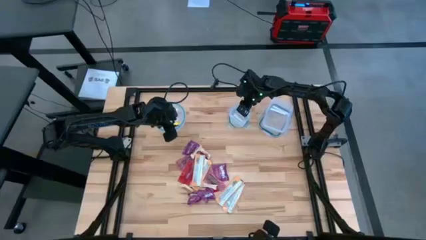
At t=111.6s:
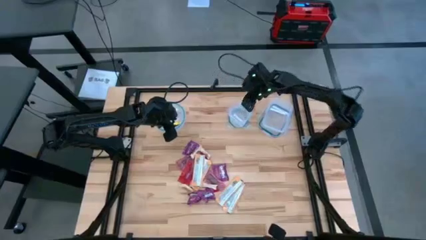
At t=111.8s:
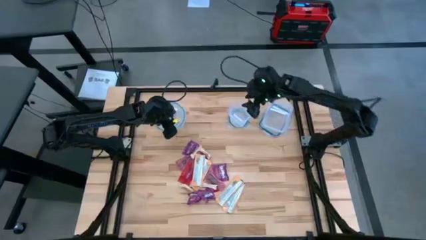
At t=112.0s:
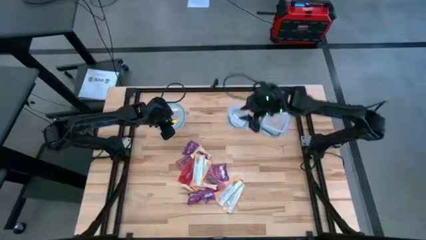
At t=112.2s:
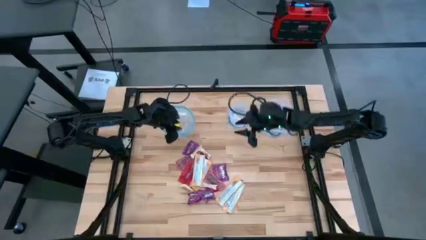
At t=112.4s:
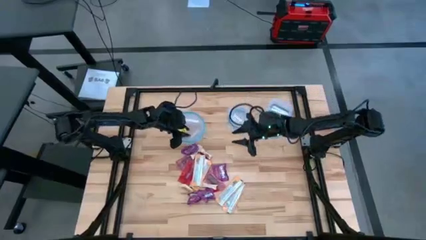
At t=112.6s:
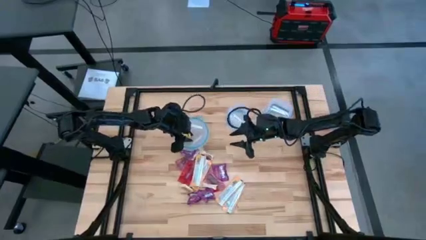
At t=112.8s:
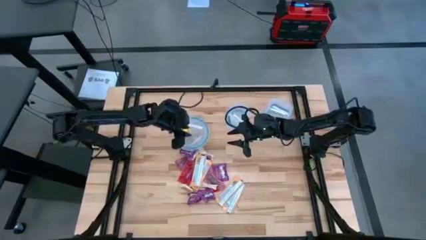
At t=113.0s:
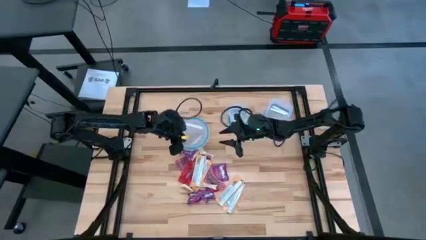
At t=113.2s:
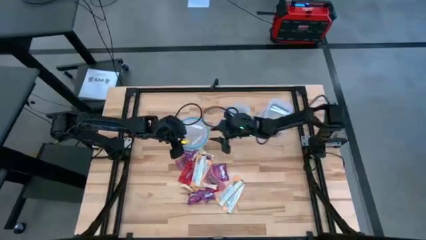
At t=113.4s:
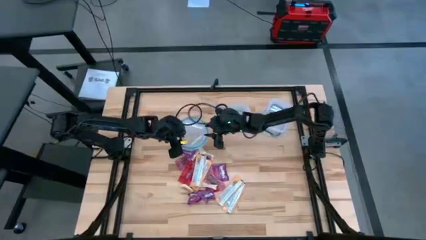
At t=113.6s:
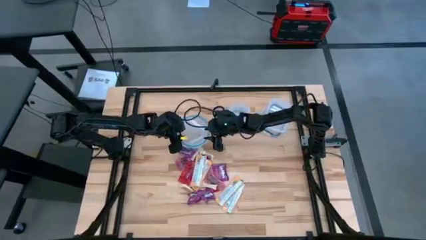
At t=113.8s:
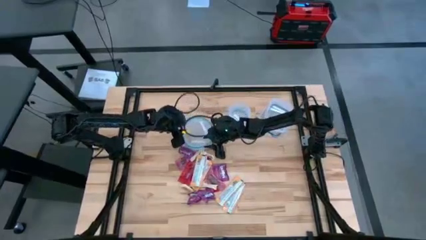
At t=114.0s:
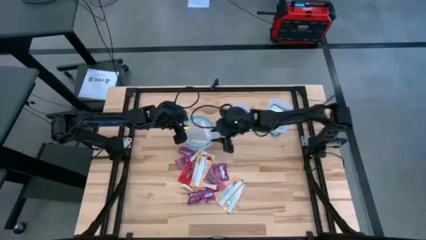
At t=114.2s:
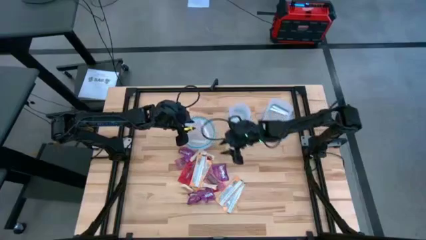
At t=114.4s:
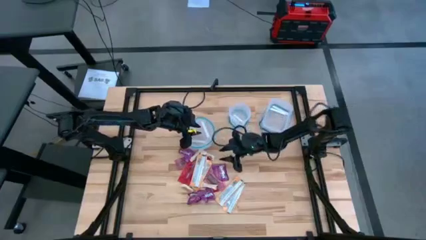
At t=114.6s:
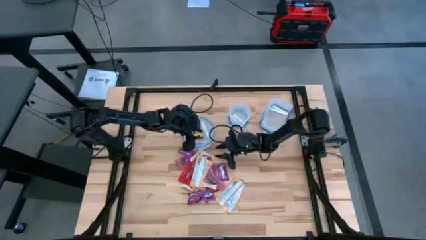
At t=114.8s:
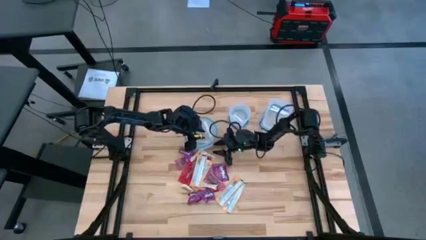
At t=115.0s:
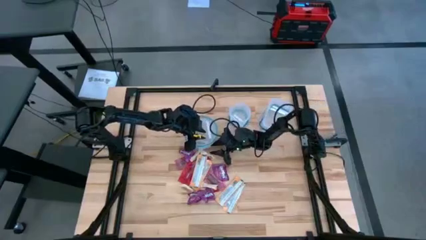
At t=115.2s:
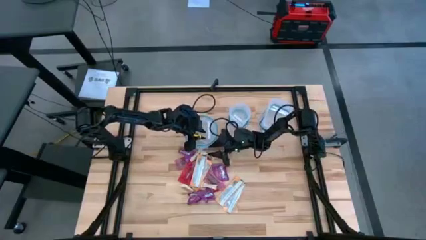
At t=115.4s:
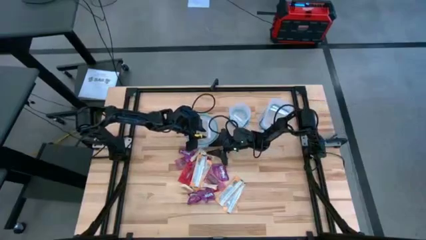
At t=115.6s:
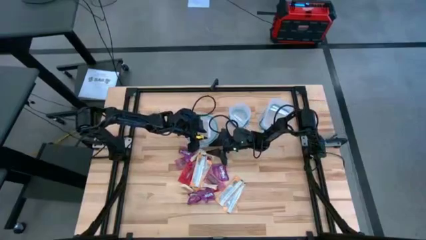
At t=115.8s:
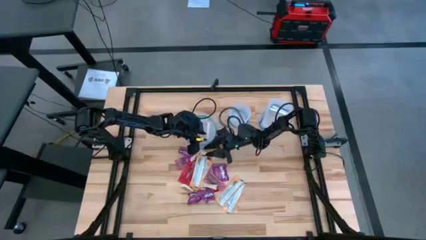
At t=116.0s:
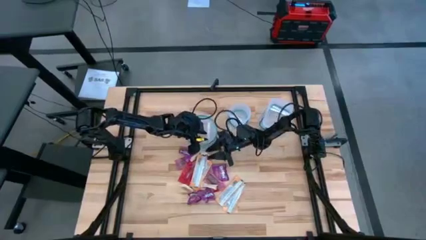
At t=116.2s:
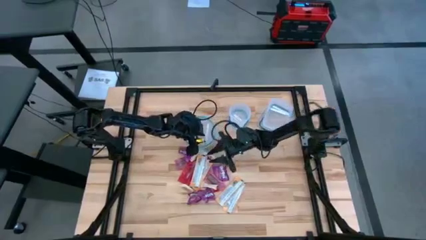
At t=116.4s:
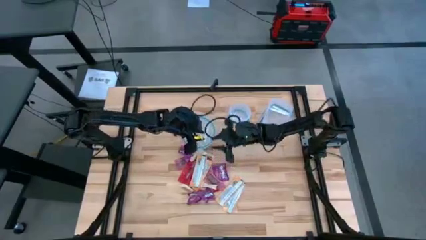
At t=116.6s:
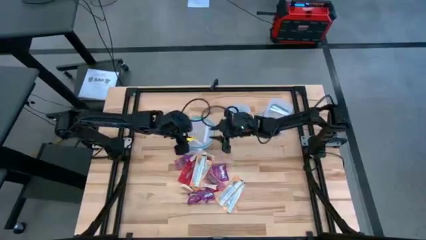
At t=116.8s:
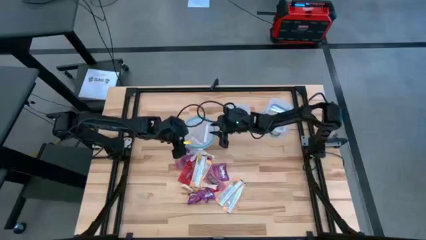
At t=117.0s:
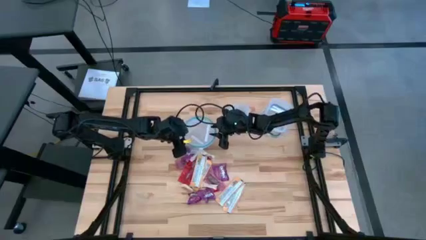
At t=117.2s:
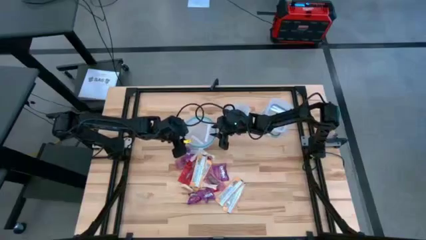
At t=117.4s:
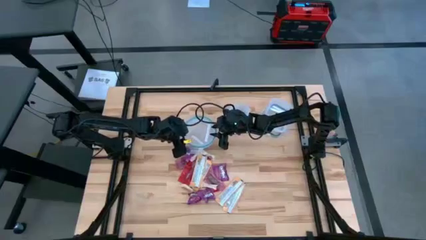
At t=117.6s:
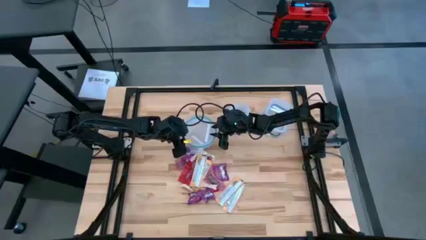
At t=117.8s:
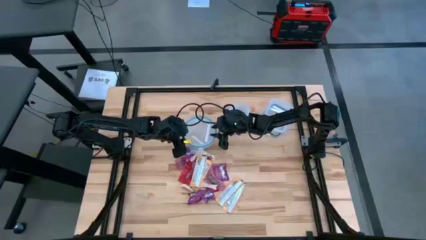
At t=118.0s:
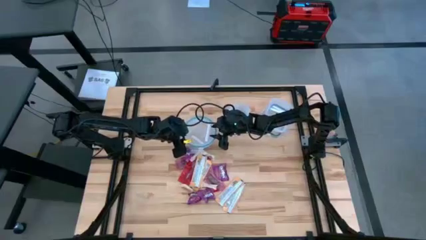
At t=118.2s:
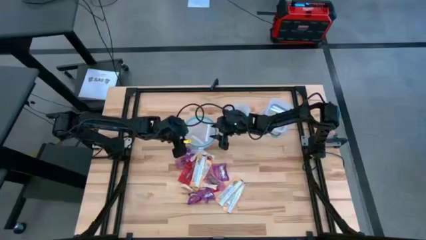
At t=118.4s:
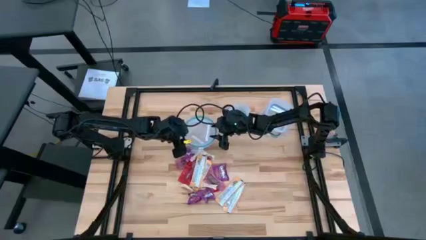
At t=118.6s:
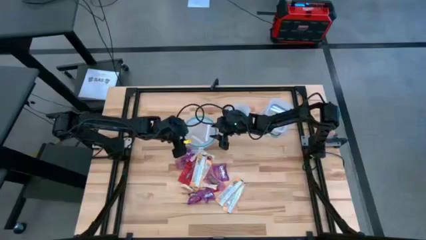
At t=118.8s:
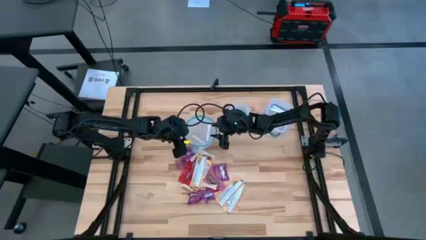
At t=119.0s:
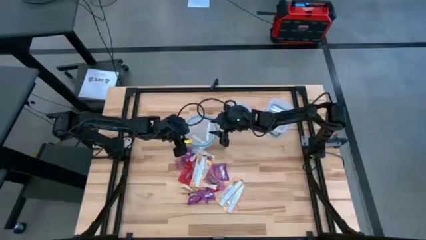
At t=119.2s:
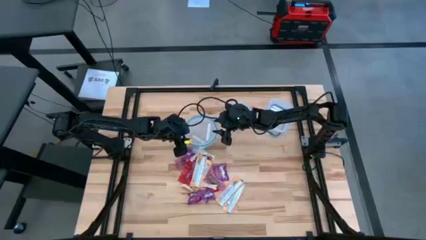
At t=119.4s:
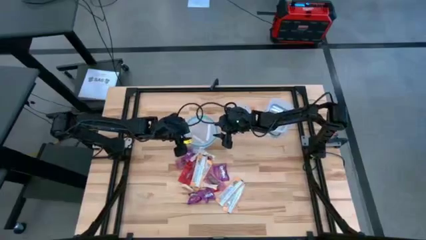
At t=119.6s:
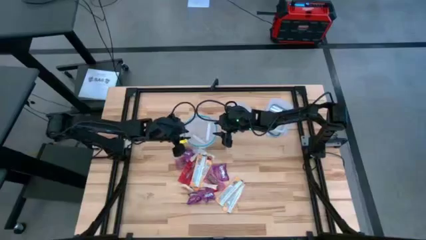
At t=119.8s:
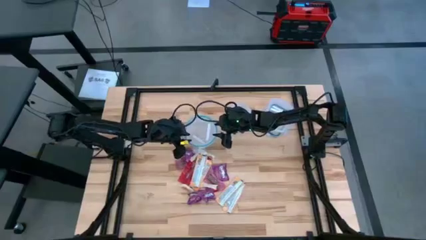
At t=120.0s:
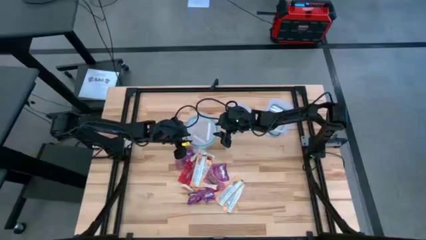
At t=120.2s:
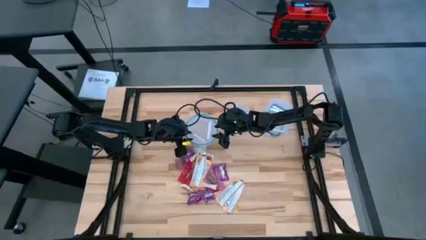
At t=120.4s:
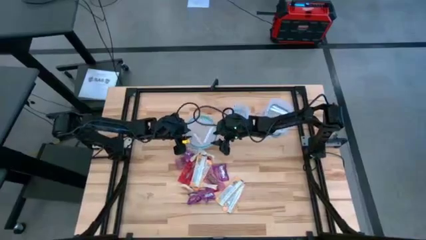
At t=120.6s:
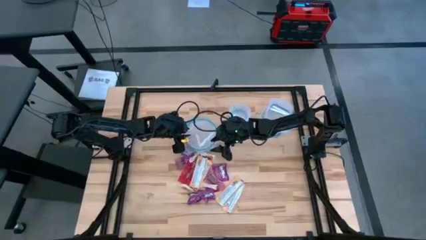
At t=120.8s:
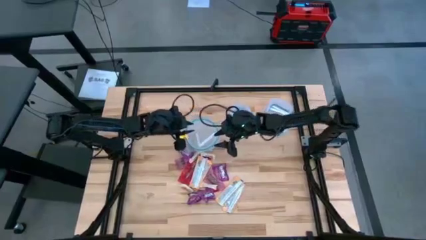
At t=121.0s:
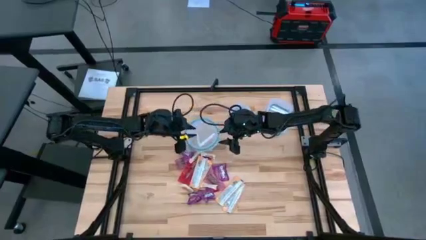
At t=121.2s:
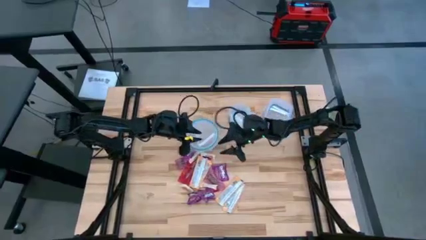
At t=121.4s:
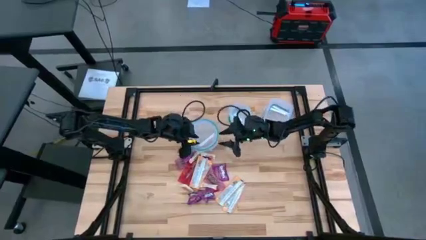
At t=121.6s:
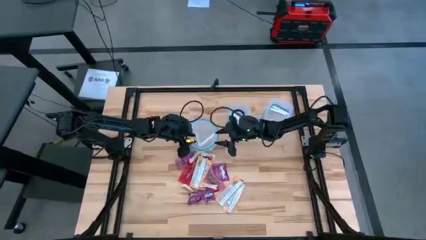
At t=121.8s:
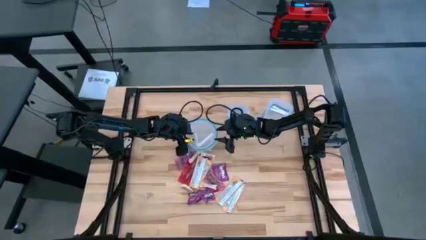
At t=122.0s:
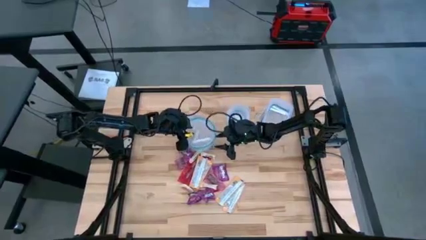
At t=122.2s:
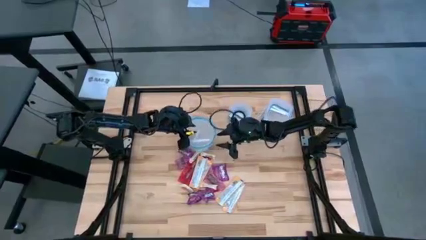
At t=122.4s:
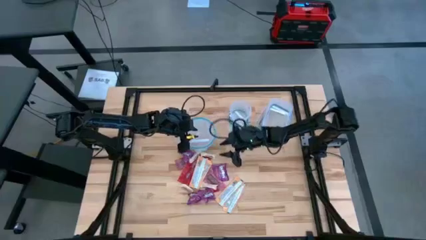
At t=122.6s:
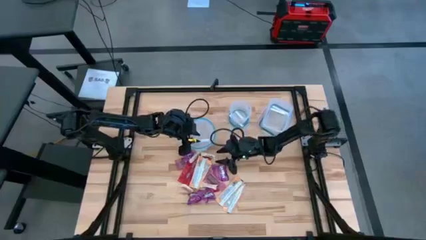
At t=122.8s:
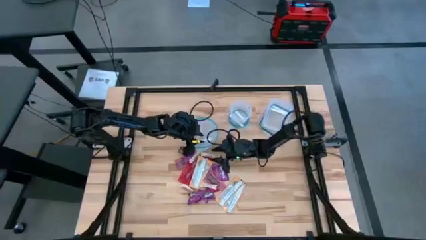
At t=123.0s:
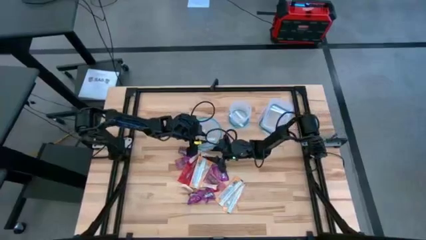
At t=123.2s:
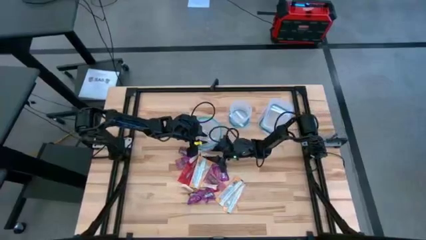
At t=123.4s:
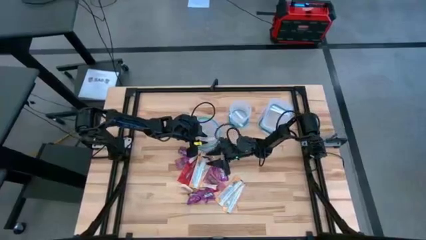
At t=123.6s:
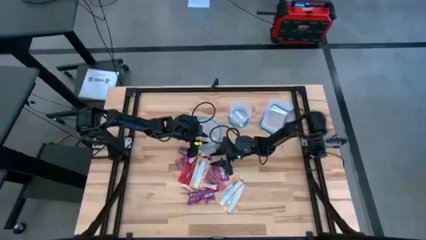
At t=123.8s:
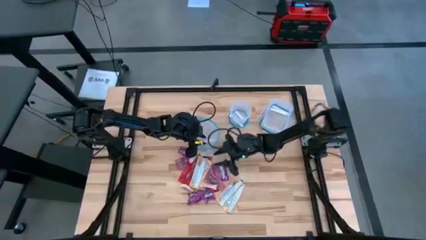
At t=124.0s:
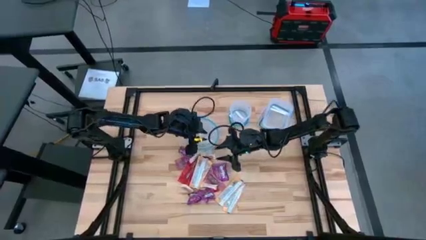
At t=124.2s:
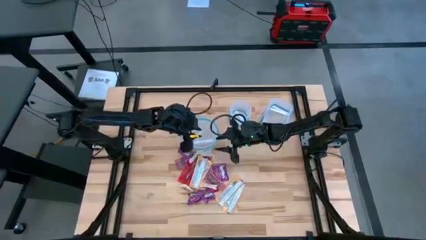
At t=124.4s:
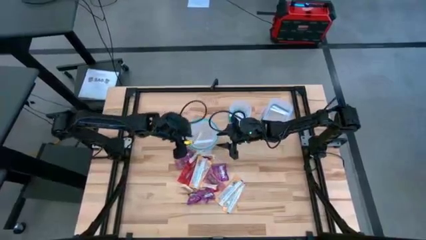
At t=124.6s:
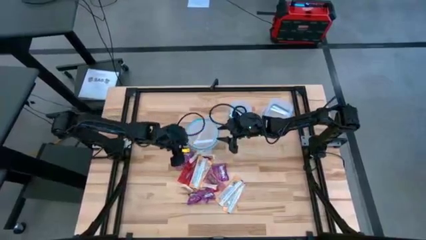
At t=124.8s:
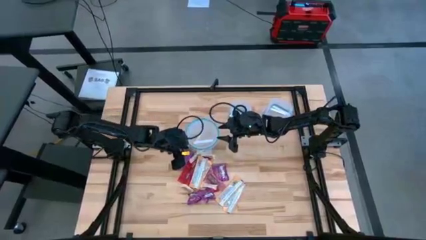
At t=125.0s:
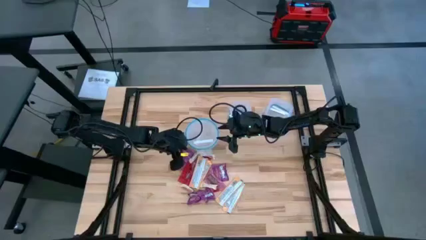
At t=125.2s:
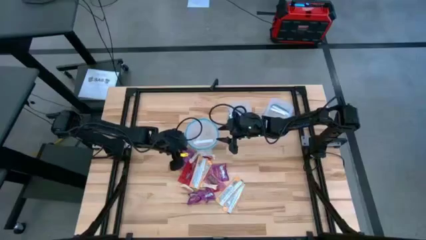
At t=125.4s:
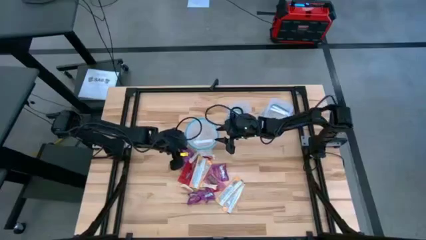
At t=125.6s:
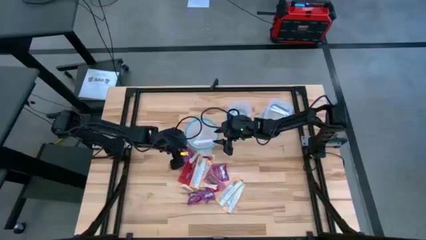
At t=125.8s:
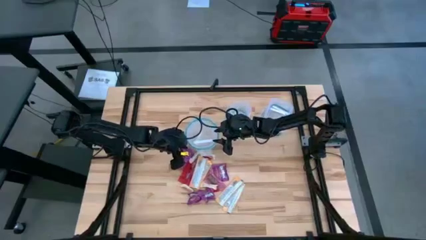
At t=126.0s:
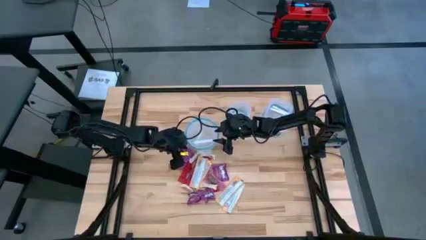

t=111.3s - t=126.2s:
Task: Sort candy
Open the big round transparent bin
